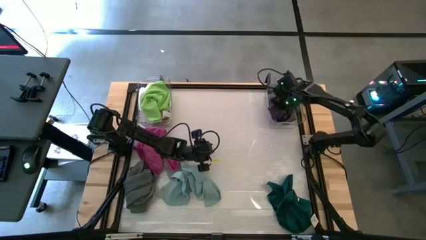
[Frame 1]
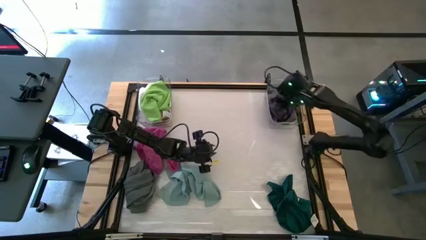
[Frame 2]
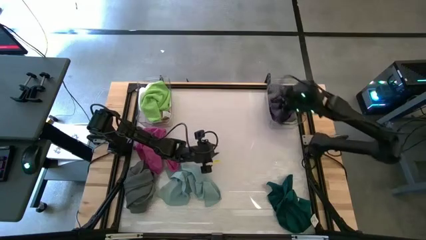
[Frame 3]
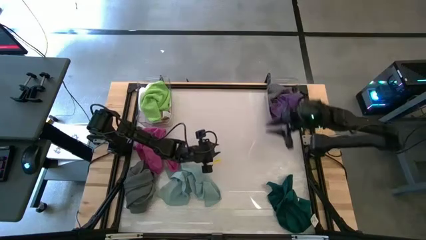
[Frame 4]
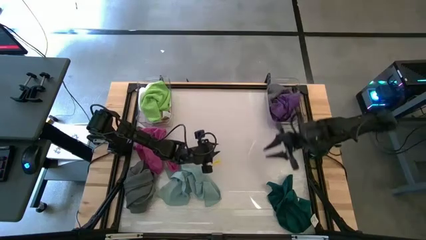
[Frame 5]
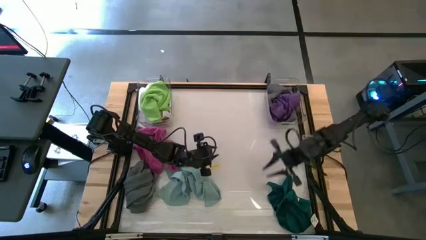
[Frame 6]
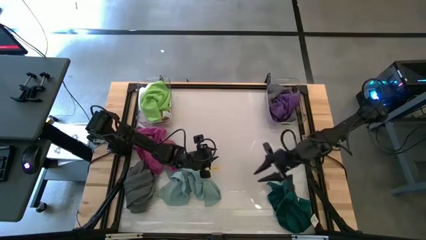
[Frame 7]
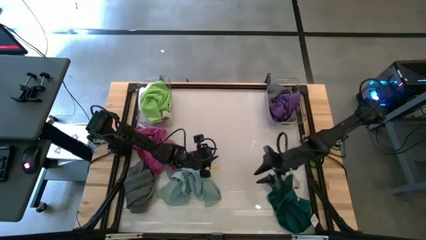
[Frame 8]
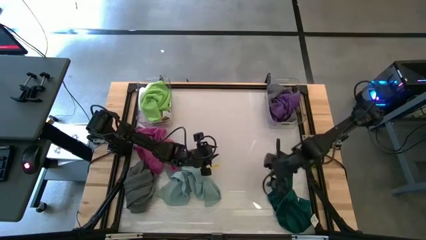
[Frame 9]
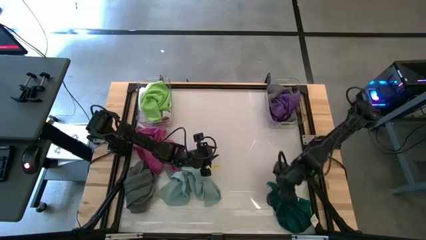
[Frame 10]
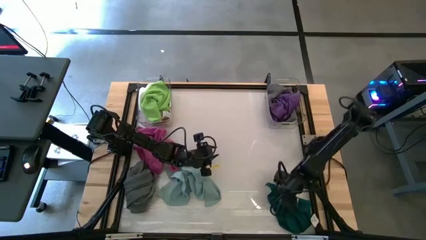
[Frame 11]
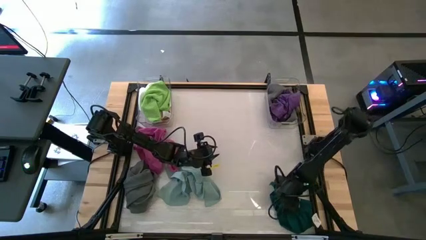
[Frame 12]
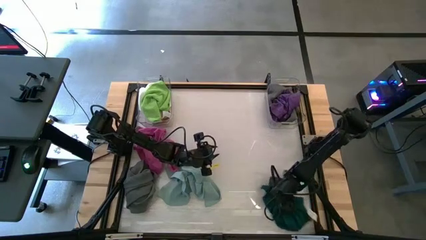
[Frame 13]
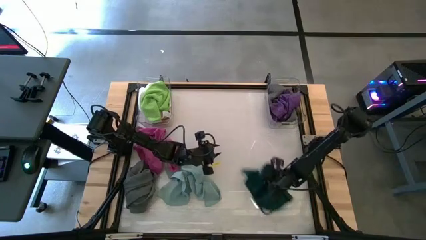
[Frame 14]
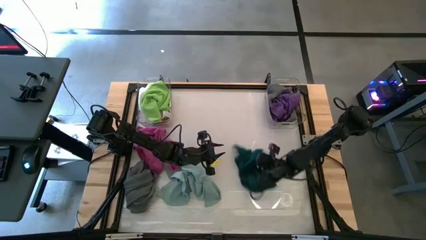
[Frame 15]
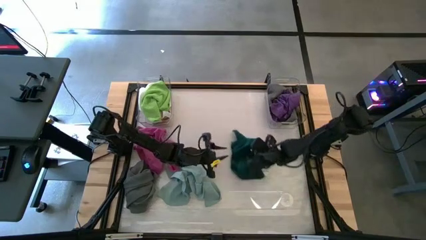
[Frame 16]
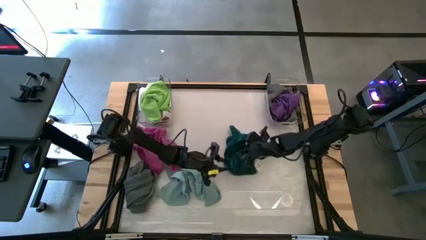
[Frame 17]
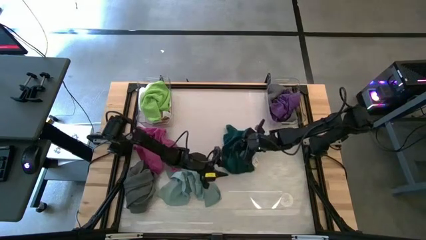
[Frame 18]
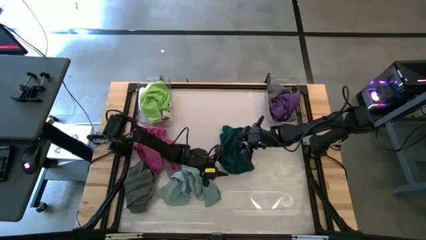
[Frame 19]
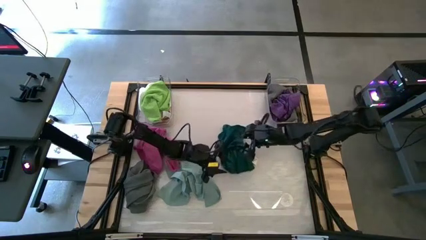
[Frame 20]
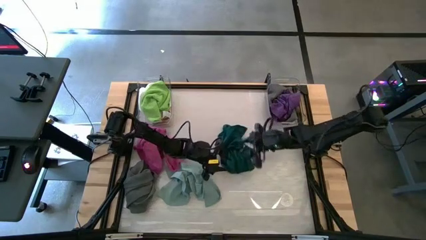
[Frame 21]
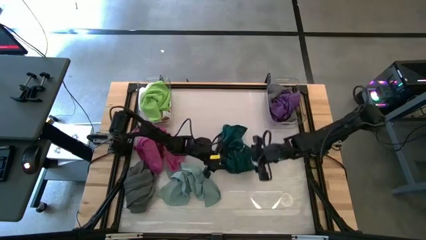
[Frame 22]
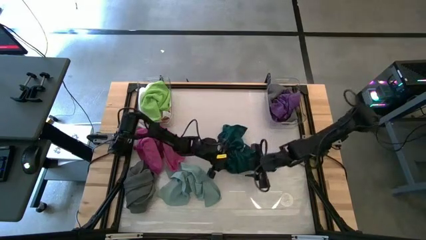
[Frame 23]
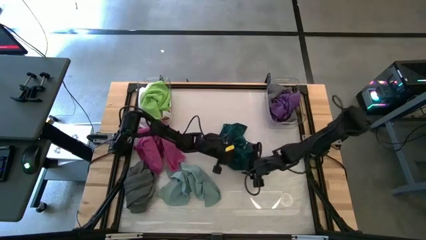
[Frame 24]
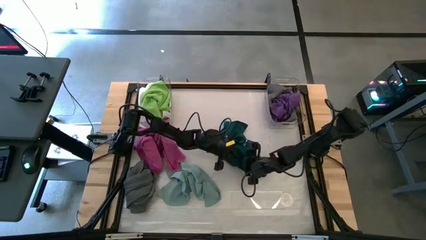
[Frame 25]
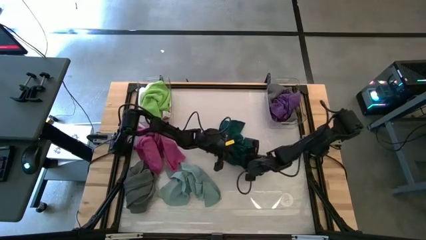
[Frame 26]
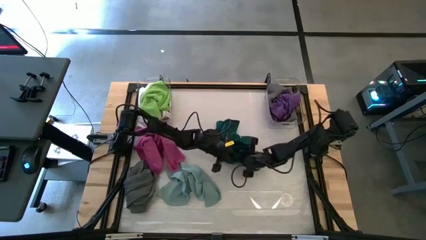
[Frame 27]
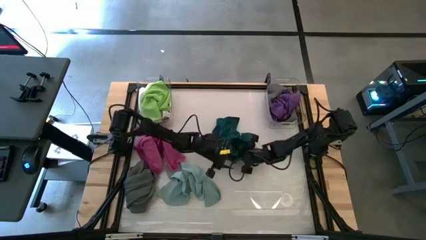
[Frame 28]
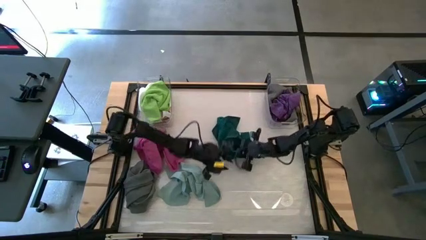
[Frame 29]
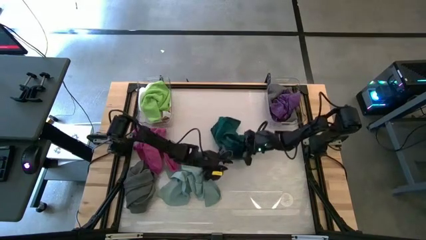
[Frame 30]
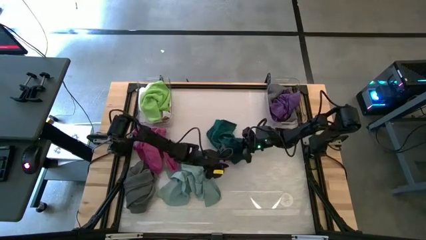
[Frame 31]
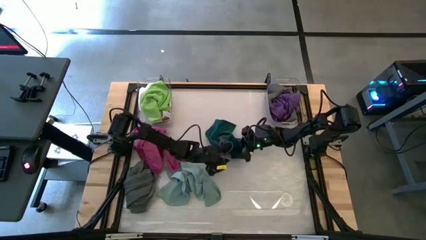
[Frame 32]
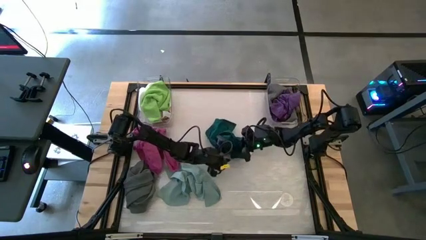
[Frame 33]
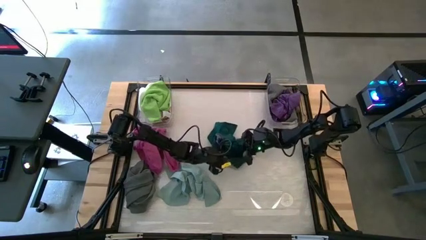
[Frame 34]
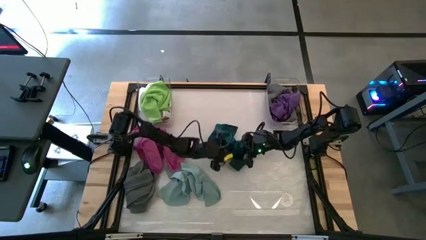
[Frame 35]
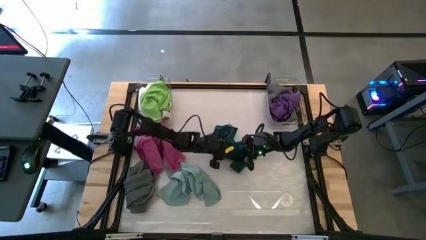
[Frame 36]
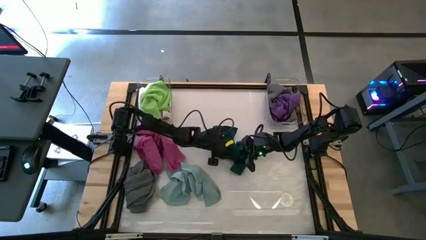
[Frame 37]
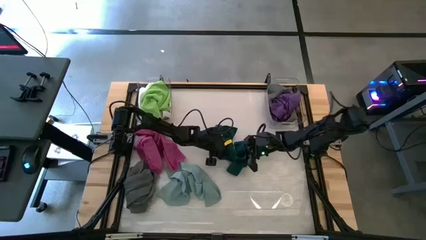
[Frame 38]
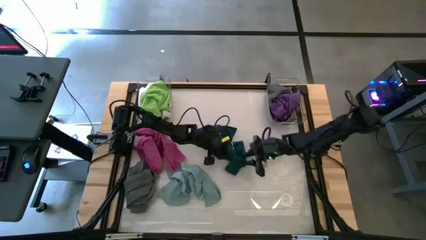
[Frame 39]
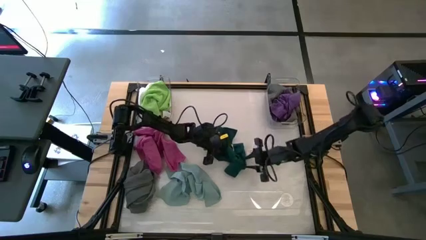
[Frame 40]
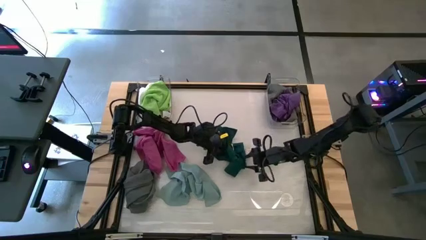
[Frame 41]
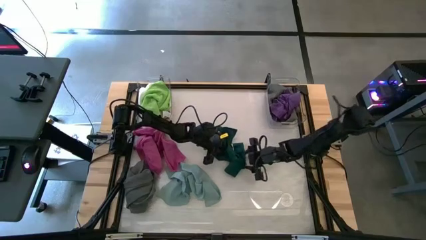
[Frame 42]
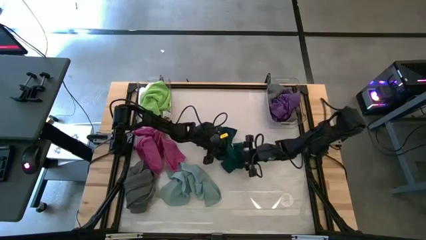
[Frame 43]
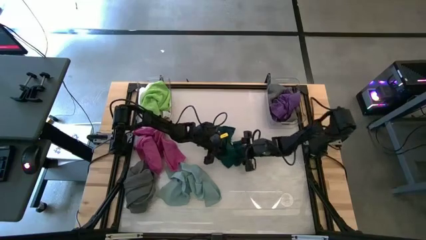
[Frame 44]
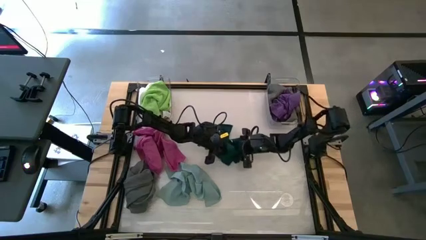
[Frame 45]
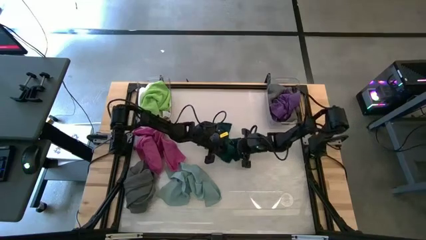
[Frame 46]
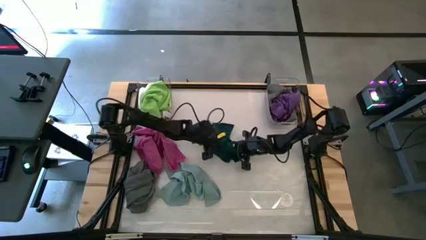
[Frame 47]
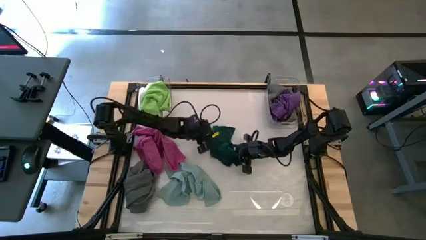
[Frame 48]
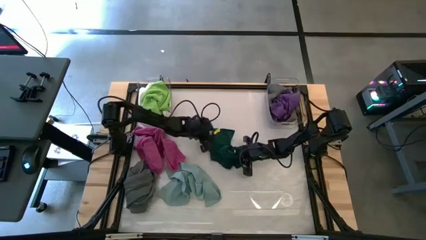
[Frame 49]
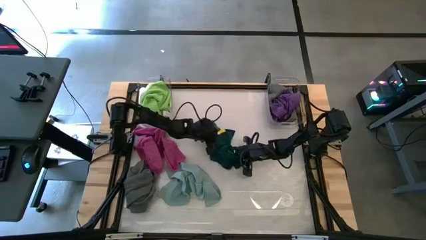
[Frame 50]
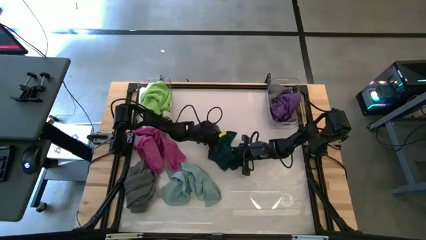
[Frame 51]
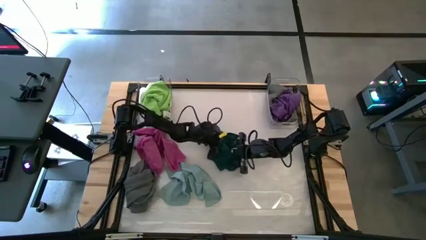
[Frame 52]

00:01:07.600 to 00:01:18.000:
Task: Sort towels by color in basket
Put the dark green towel into the right transparent bin

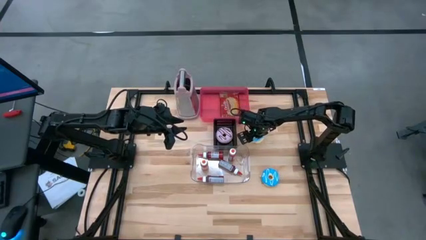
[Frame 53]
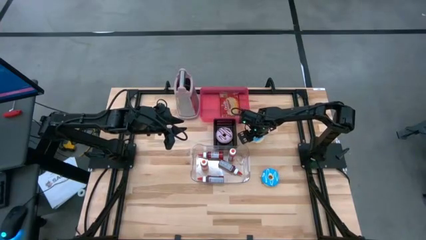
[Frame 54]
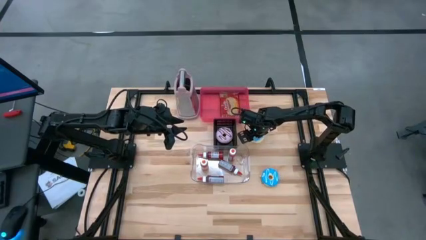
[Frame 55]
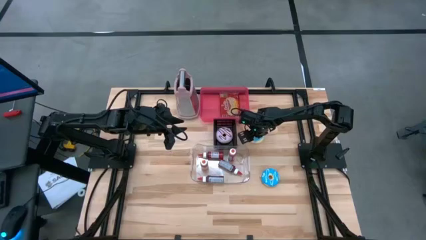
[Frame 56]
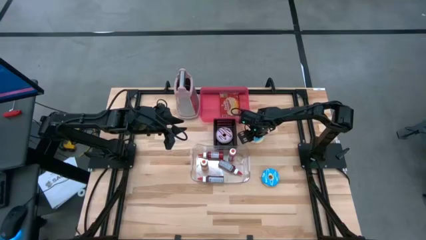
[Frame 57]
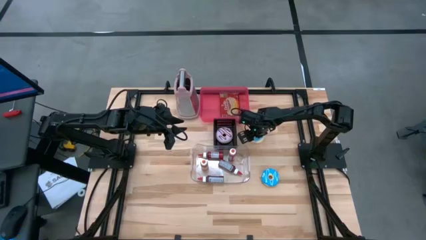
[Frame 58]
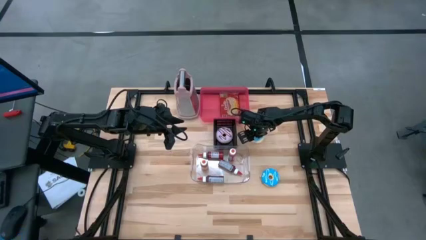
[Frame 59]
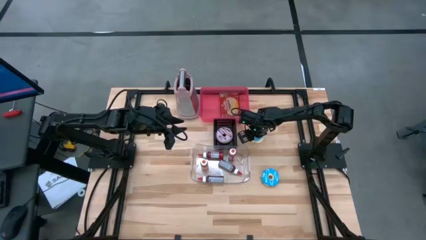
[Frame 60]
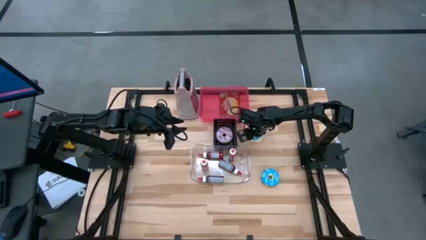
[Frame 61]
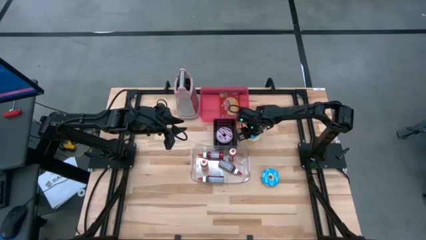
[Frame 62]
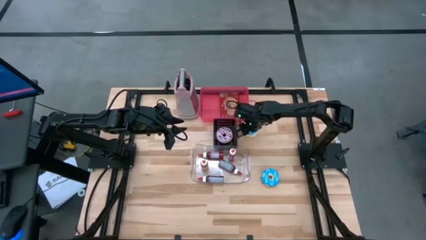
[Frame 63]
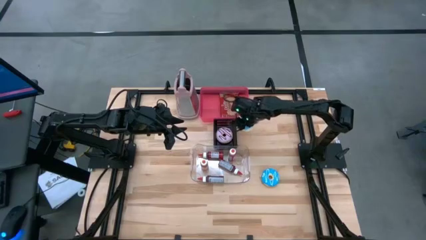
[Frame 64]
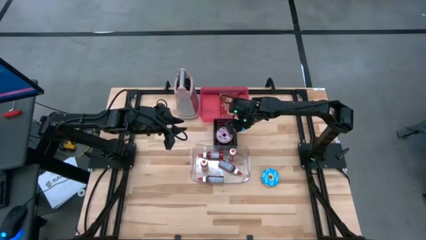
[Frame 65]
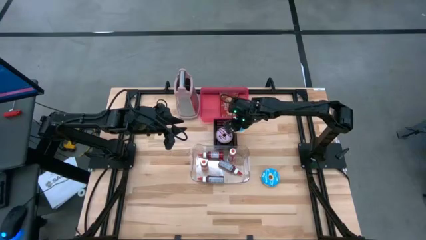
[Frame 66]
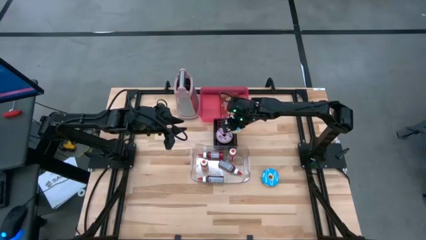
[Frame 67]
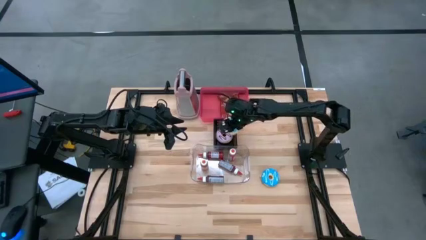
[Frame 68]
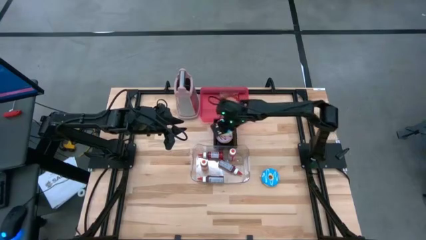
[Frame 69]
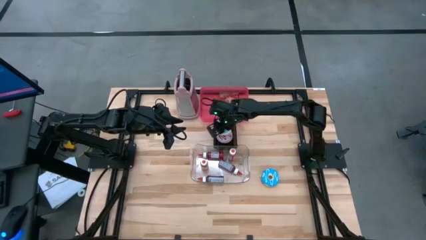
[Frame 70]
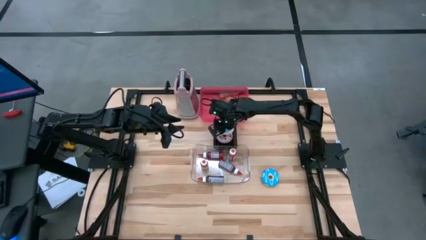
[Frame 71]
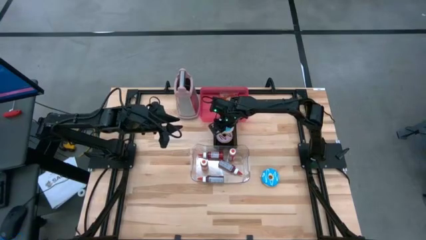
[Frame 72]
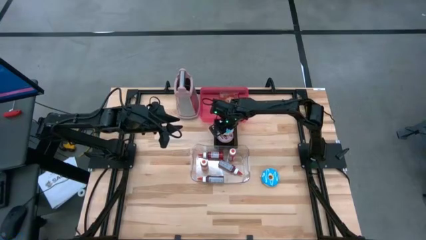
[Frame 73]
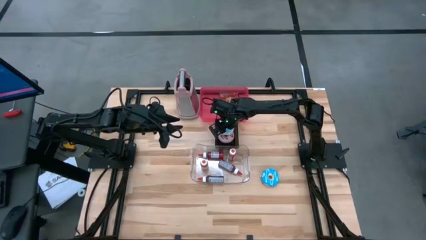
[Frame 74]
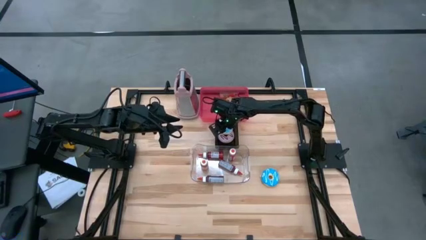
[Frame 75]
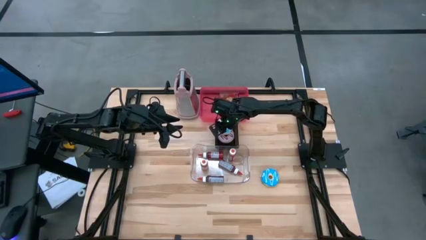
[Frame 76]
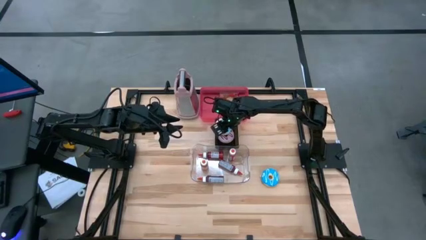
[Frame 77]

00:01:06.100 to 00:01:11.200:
Task: Pick & Place Food Item
Put the light blue donut into the black bin
